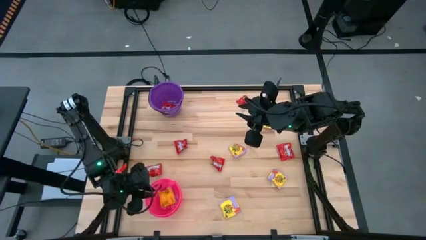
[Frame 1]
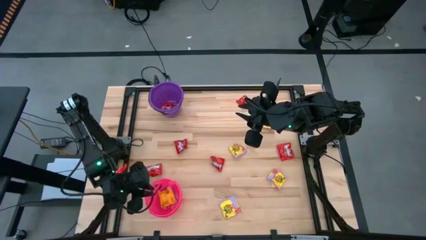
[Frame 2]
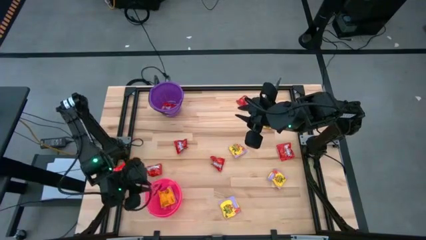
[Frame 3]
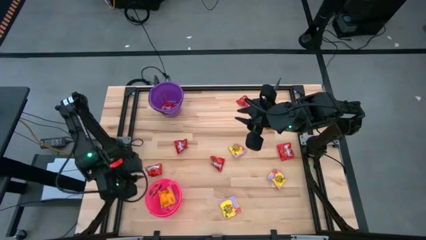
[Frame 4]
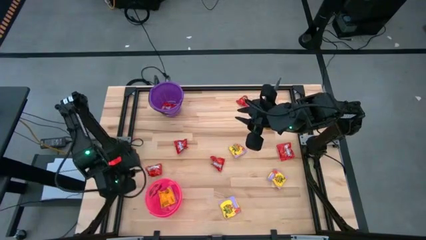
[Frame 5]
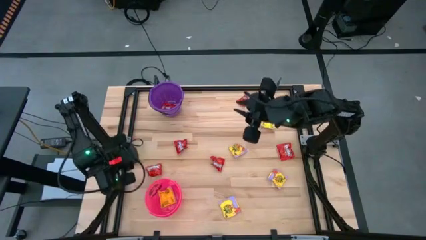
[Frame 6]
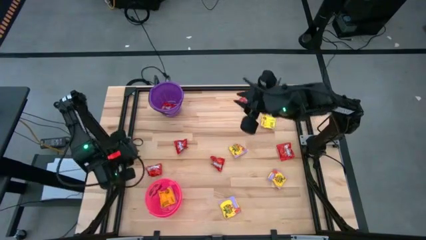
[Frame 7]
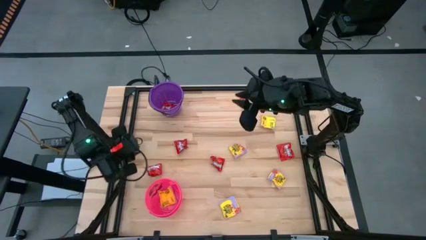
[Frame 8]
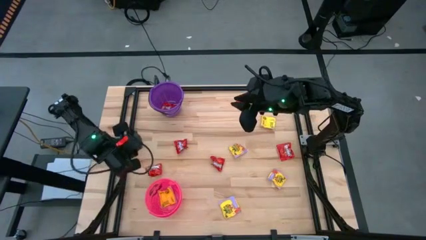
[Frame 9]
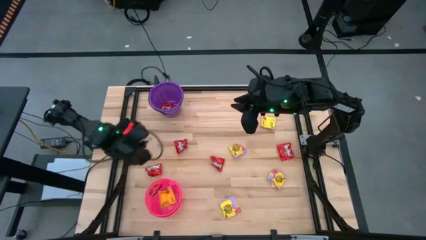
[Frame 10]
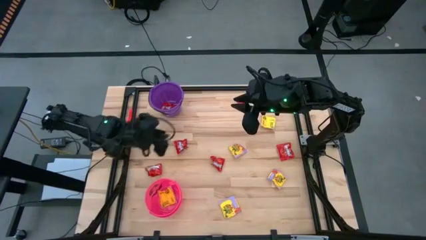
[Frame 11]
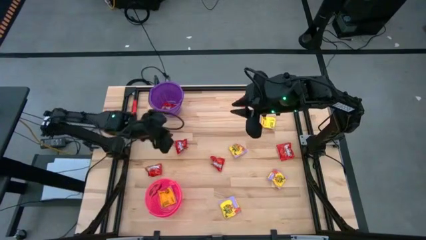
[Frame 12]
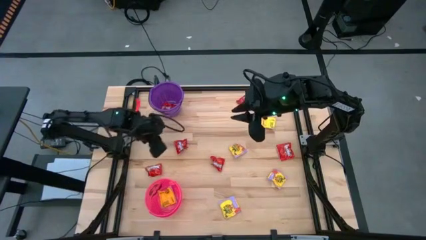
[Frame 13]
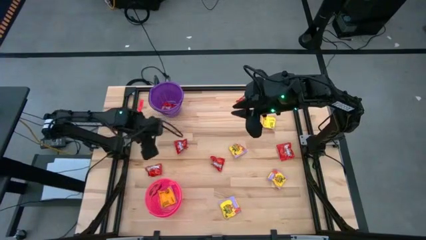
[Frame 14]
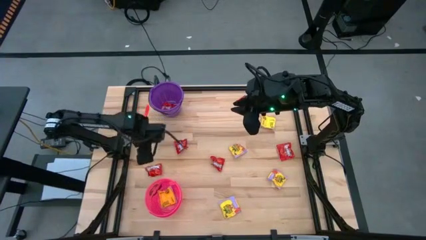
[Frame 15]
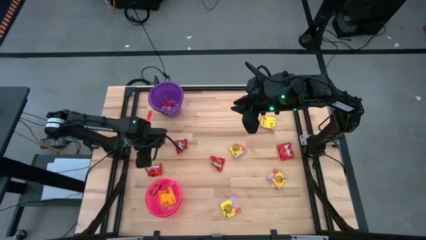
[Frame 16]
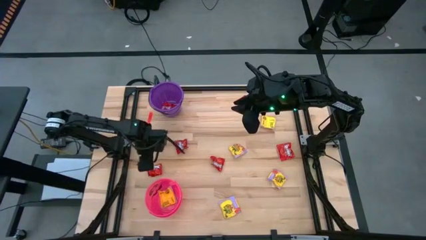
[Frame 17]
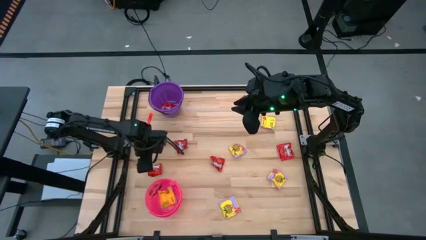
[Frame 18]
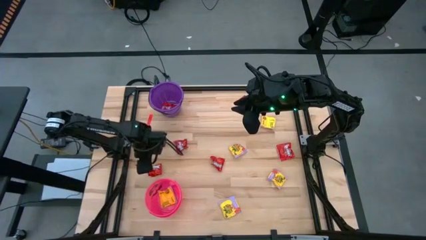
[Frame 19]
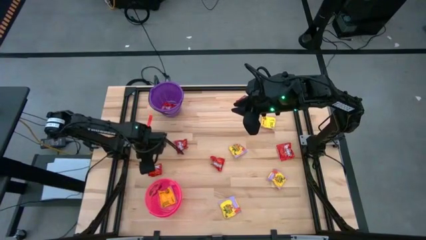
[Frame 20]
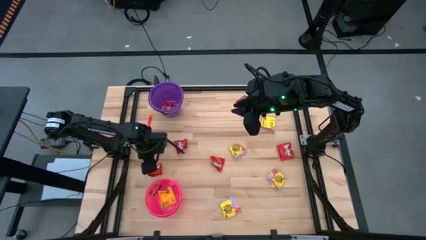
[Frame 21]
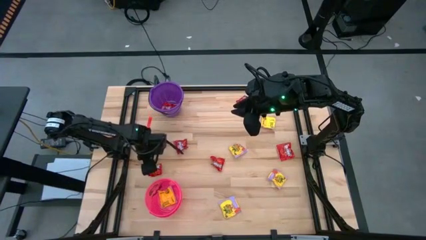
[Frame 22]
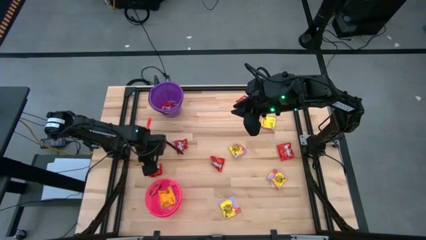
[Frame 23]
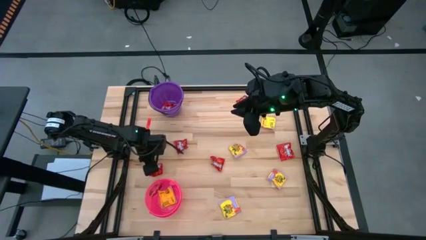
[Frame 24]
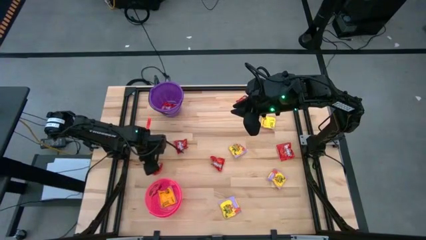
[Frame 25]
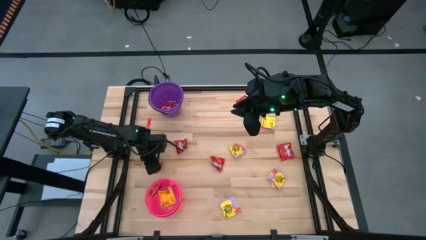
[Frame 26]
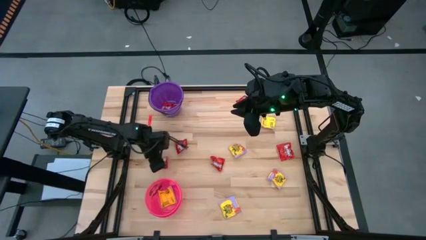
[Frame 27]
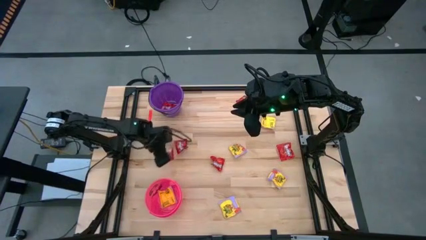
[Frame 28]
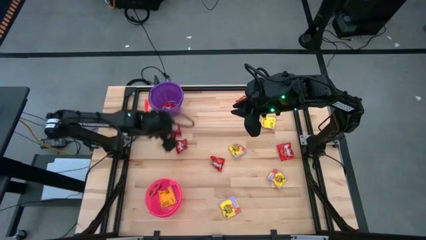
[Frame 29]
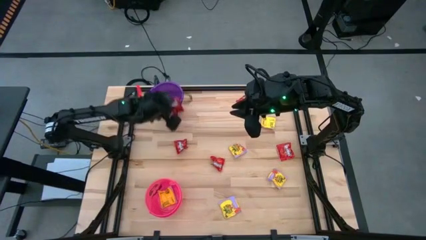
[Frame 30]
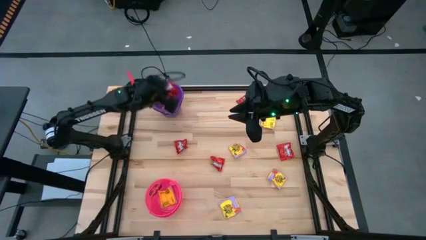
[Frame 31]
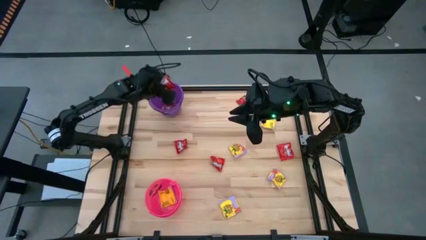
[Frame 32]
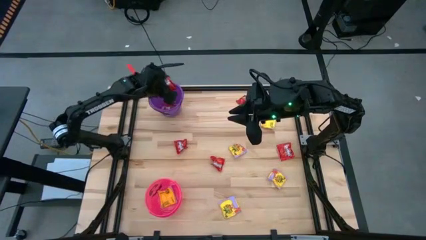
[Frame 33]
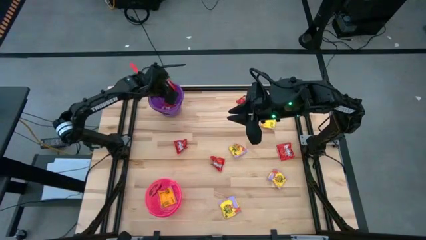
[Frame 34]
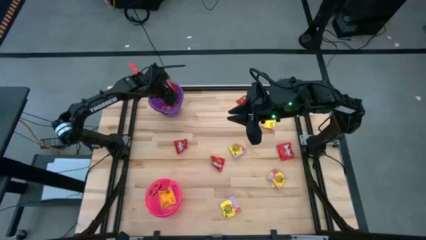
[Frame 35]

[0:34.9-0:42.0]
Task: Sort candy by brand, put in halloween buckets
Put the red candy into the purple bucket

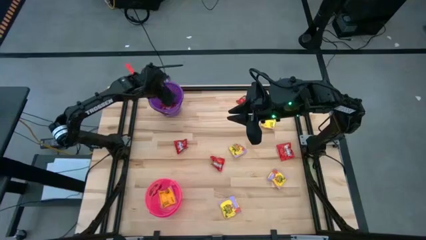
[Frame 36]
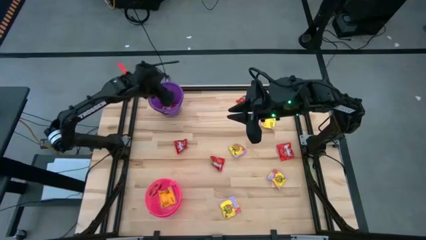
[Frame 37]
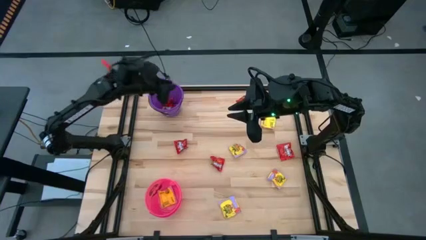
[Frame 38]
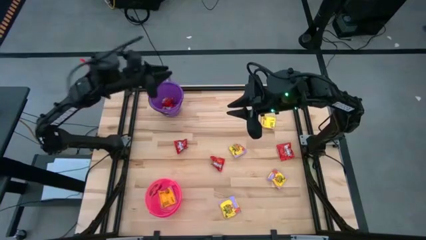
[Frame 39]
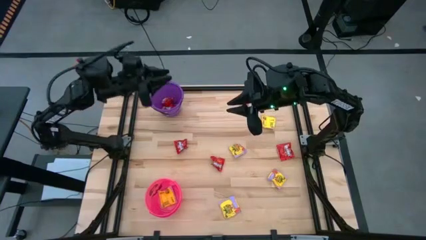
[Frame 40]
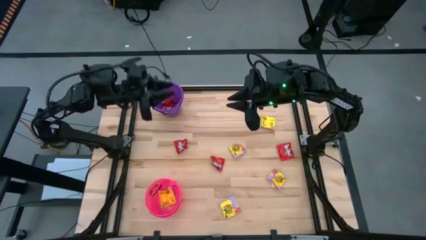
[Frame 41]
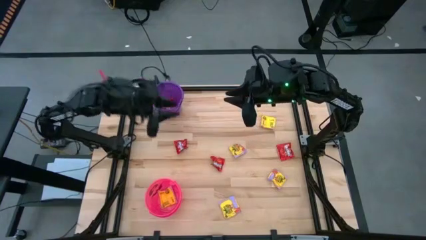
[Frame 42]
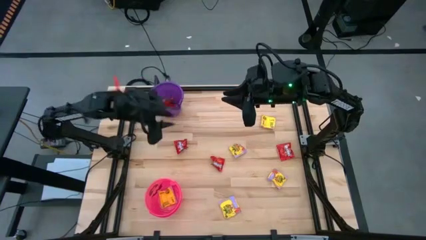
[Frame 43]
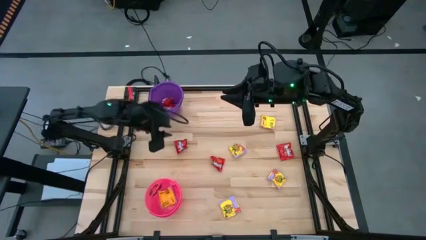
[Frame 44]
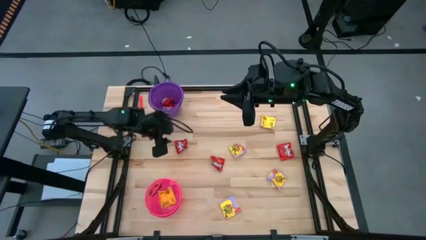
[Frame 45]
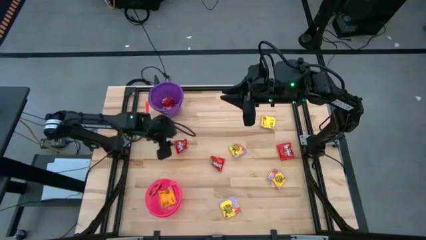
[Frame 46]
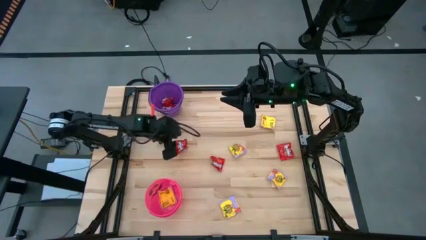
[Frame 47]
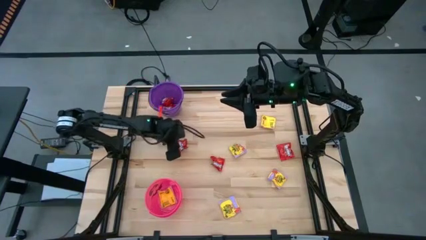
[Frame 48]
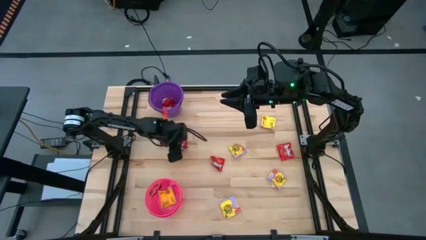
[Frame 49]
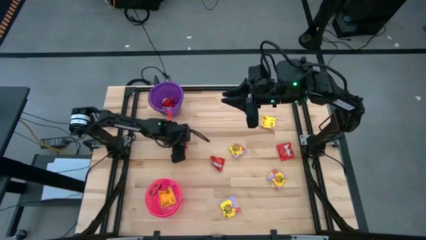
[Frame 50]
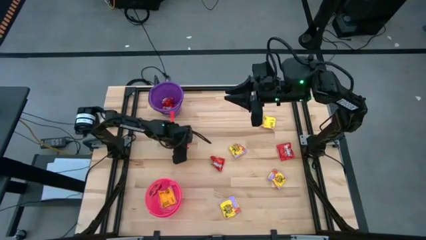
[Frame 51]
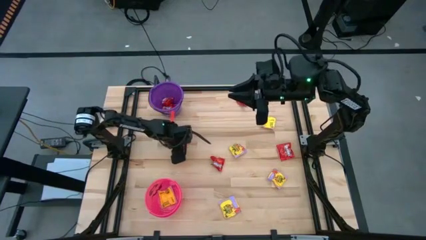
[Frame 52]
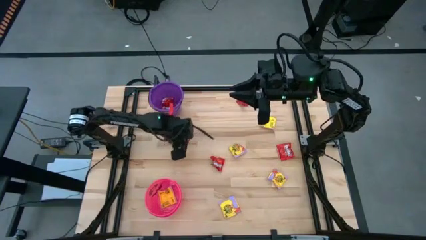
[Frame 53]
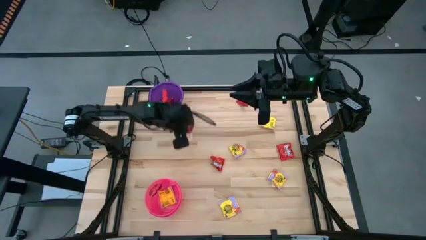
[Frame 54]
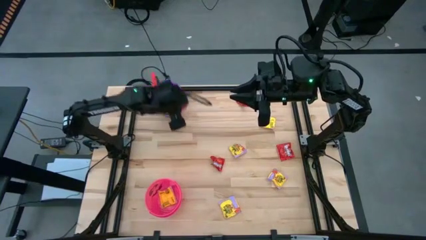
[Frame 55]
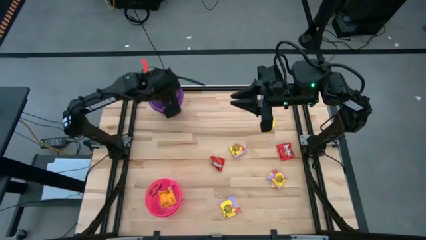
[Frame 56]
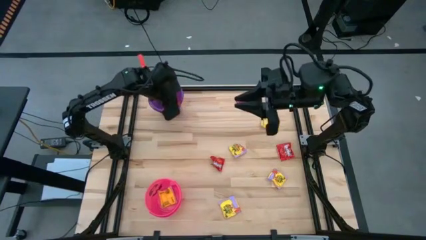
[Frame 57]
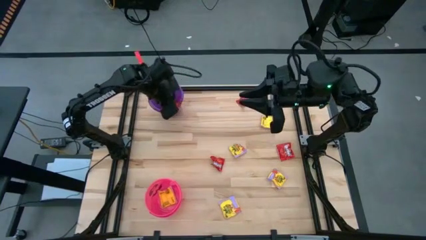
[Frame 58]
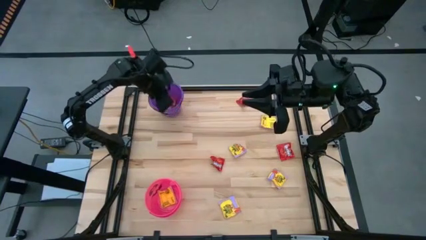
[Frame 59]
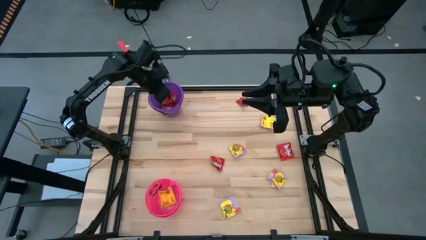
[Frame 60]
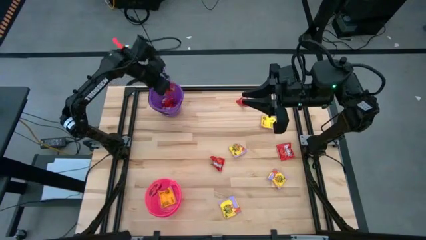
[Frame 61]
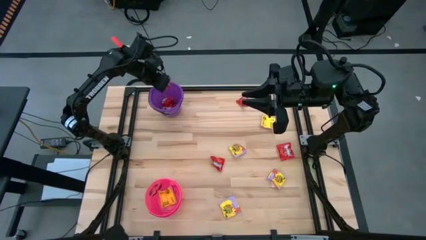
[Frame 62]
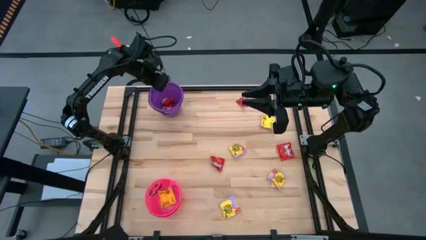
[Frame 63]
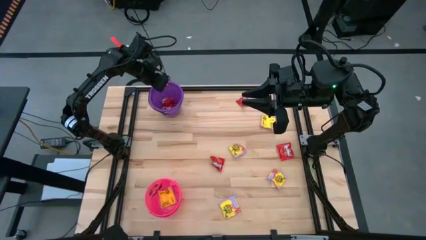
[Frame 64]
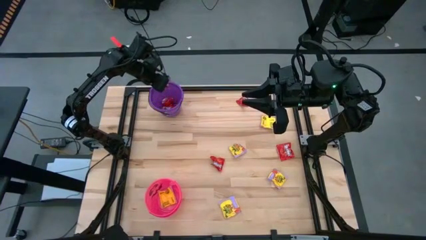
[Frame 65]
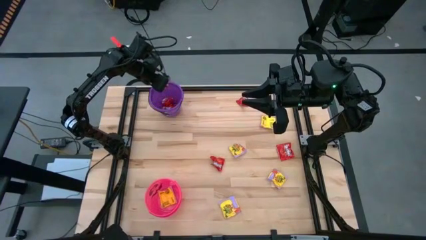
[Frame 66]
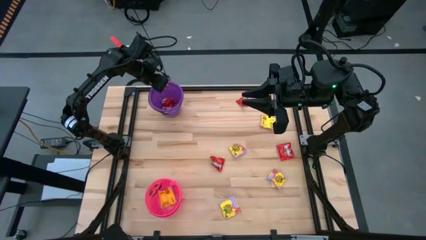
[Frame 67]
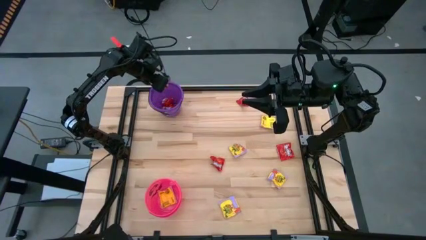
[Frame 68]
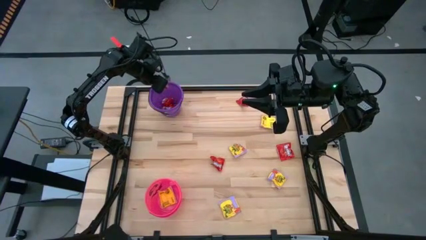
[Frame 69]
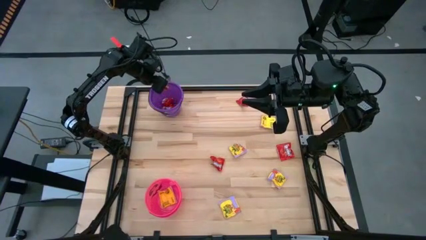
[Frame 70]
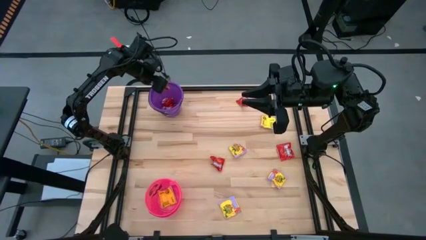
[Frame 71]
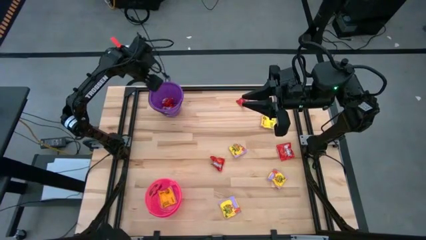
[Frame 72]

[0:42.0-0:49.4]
Put the red candy into the purple bucket

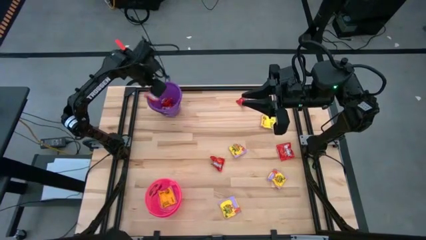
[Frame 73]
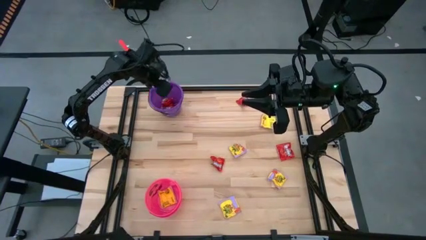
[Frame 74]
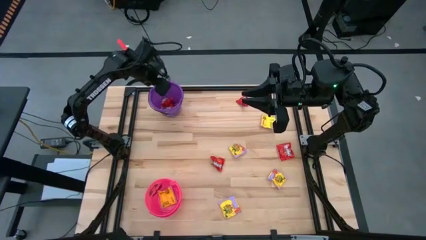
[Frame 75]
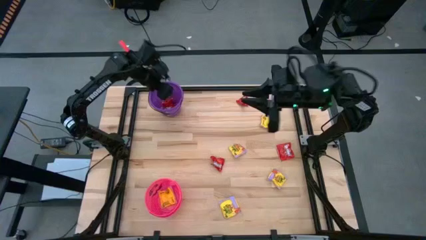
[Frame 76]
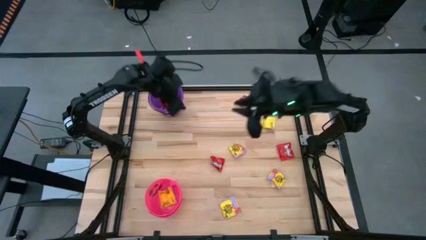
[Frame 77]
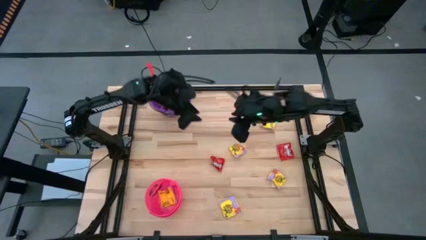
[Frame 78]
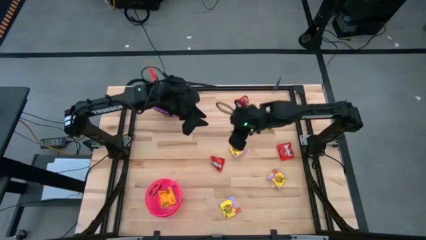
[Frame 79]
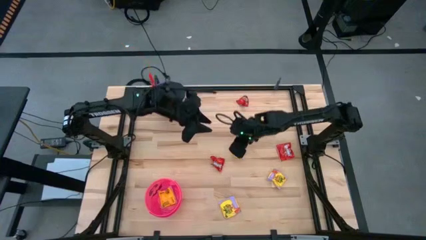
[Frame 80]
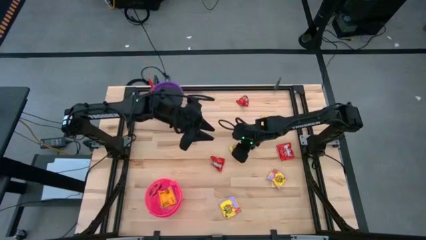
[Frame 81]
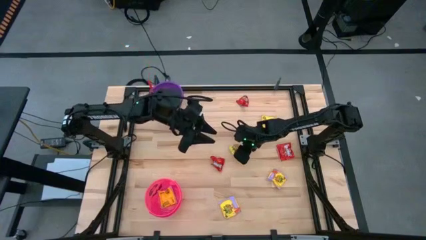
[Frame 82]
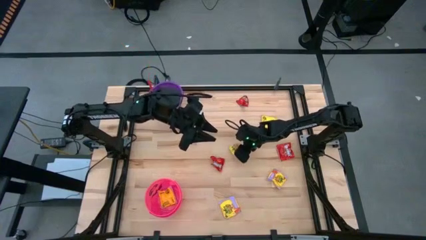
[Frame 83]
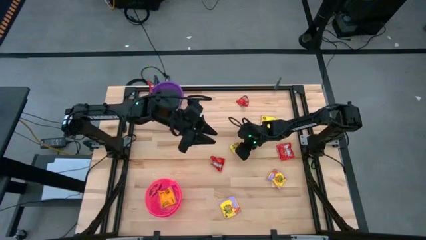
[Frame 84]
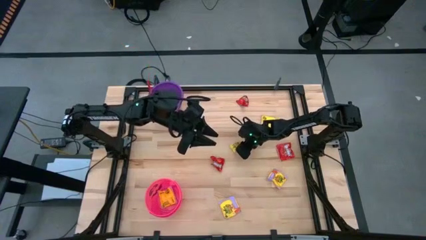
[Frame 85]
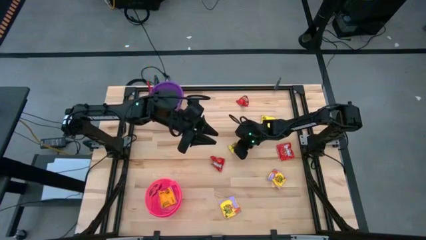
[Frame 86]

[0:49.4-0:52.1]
Put the yellow candy into the pink bucket
